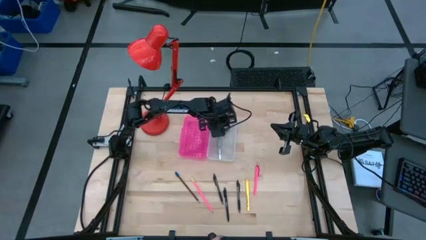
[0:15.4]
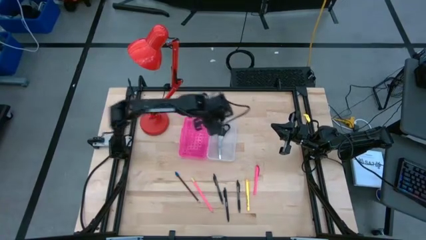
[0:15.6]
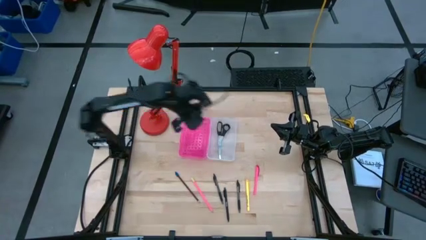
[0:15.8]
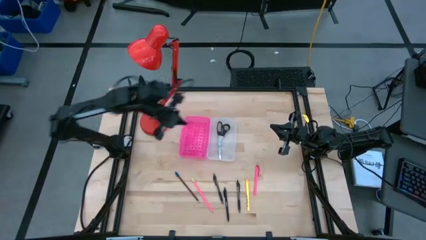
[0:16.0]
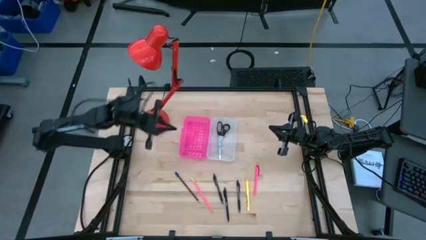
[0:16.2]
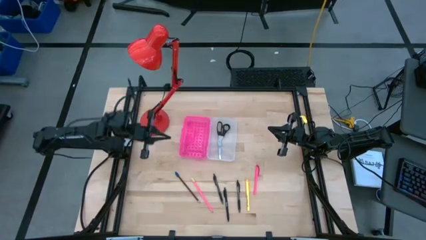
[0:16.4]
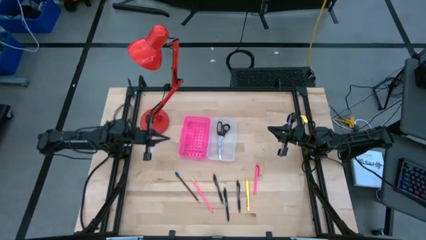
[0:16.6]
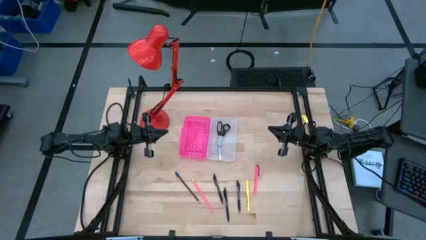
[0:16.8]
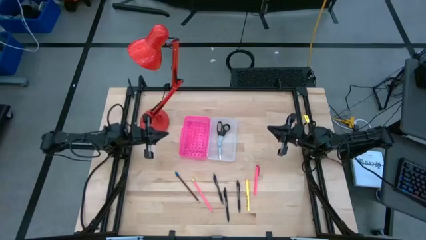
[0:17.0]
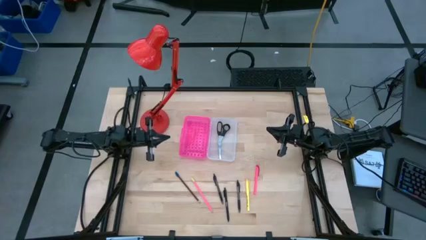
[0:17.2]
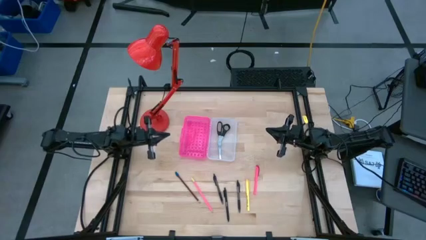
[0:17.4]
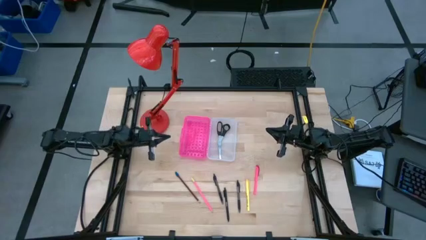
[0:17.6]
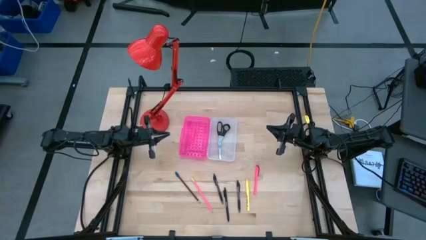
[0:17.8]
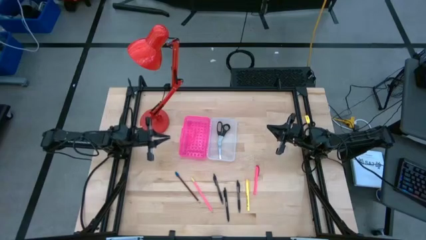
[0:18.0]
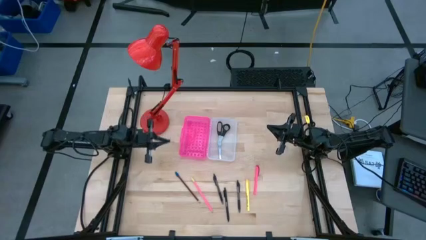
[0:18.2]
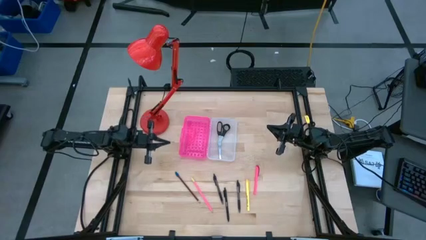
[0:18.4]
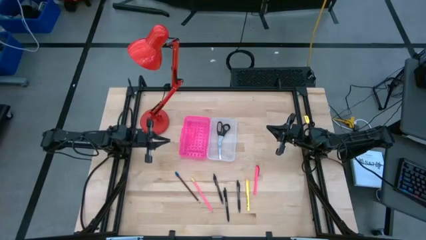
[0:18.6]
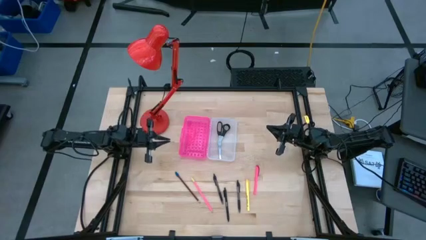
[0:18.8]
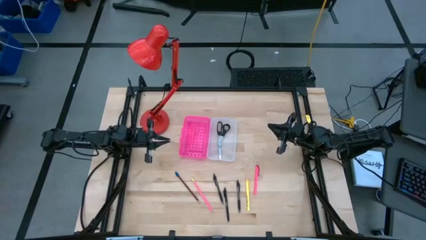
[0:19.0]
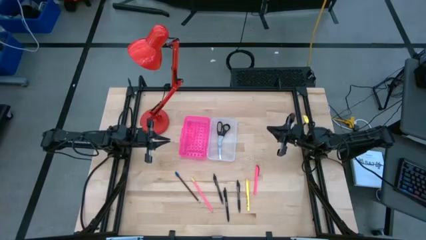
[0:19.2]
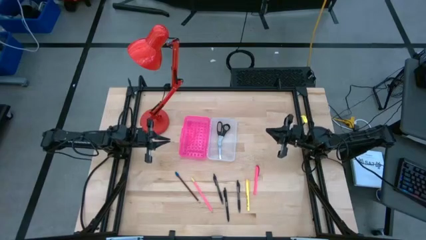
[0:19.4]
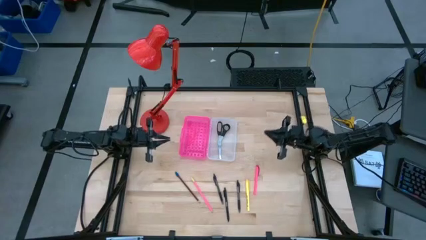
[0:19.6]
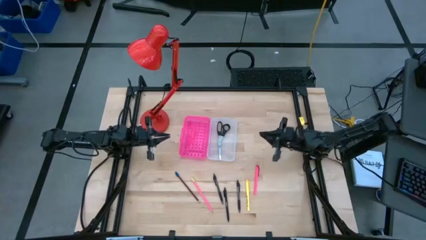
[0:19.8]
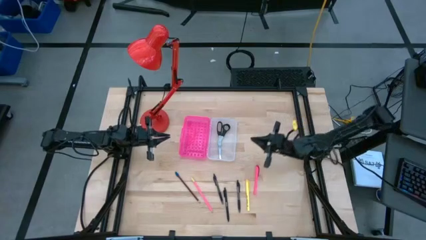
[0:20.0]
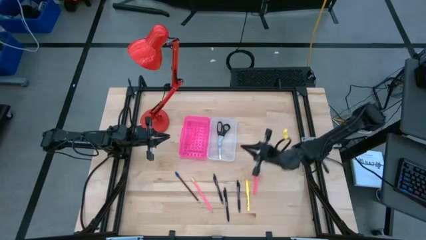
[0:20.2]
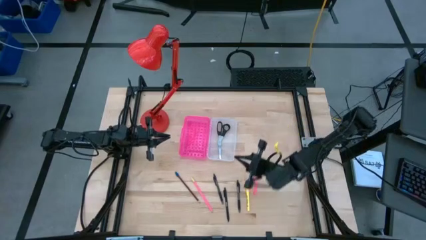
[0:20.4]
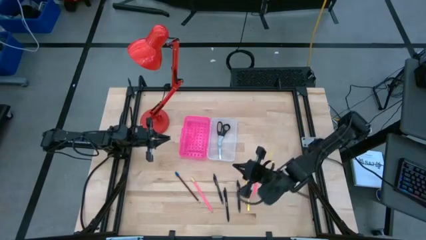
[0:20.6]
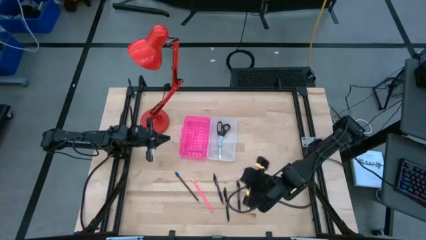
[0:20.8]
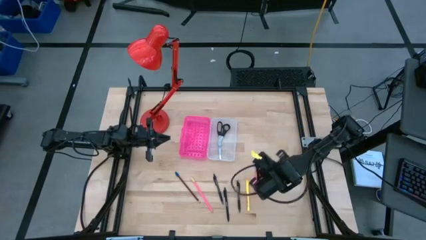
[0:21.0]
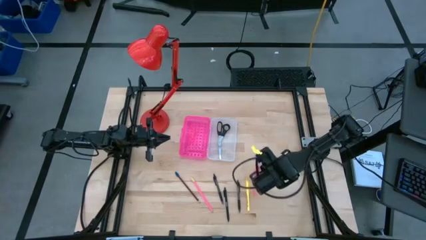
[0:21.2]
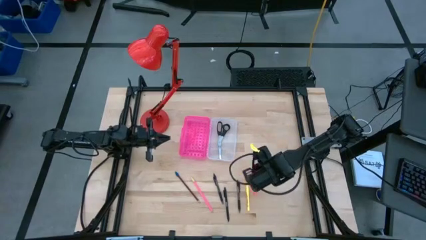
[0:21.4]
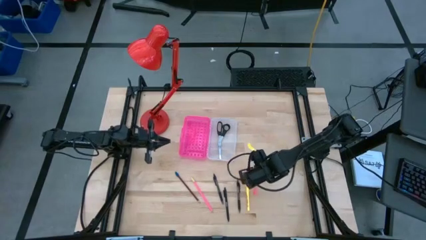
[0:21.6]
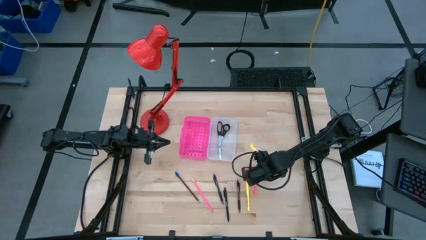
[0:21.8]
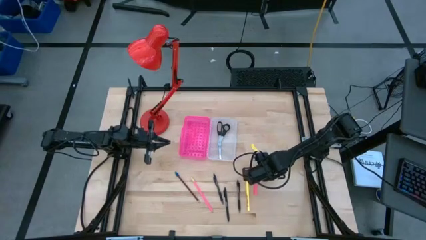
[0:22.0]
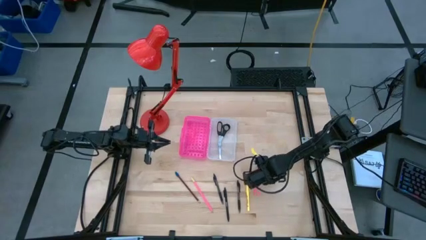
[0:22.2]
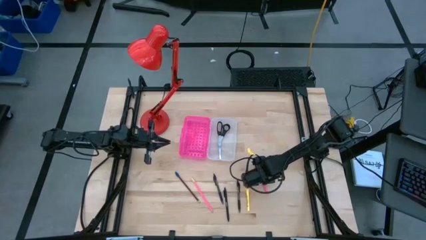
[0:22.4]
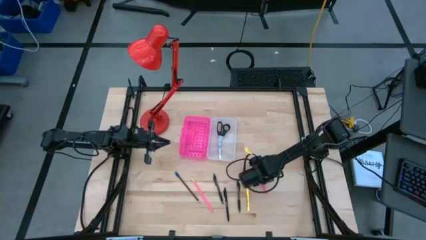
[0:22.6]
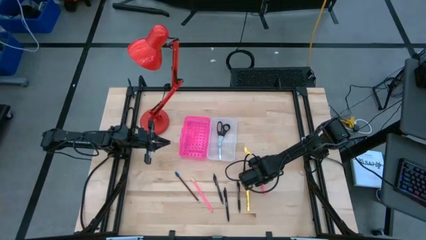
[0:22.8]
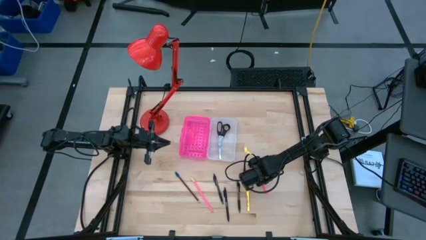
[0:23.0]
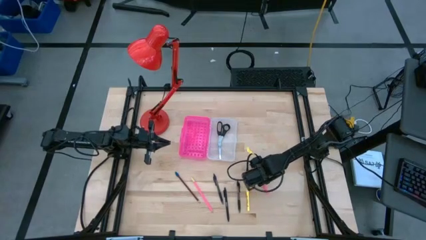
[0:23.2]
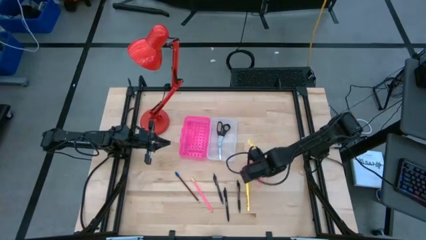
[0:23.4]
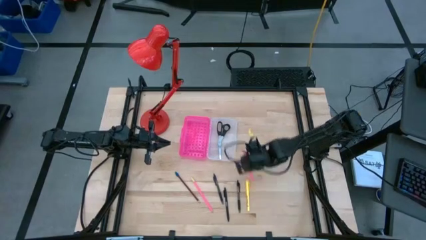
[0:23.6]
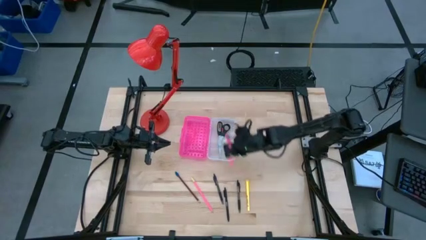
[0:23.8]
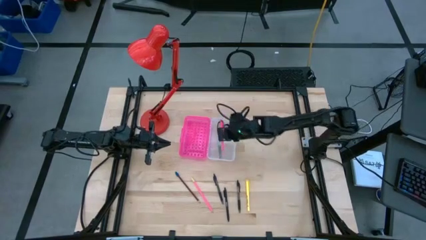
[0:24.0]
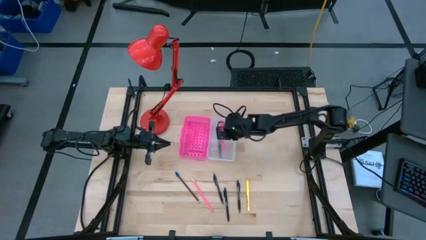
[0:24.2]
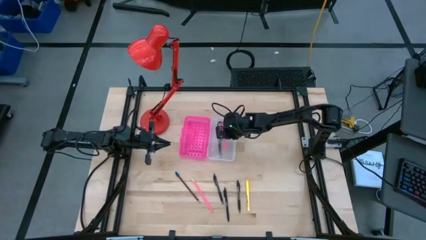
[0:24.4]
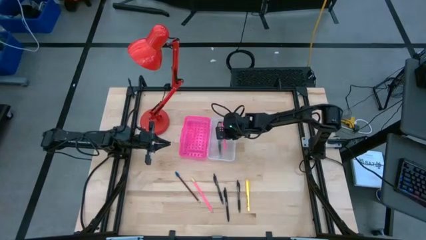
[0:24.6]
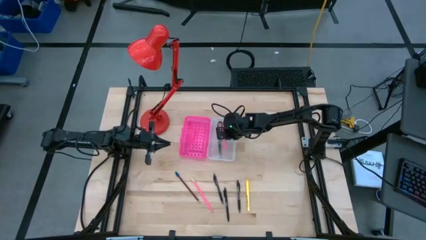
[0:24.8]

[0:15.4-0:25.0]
Task: Pick & place school supplies into a supply box
Put the pink pen into the supply box

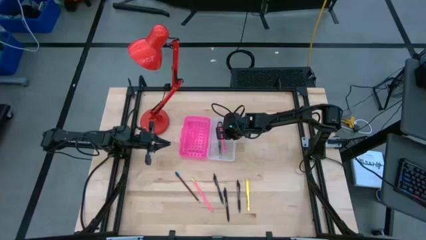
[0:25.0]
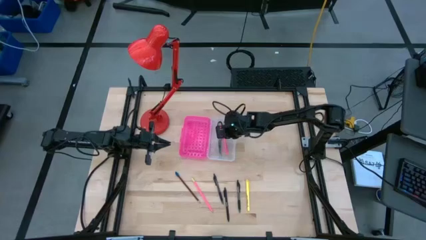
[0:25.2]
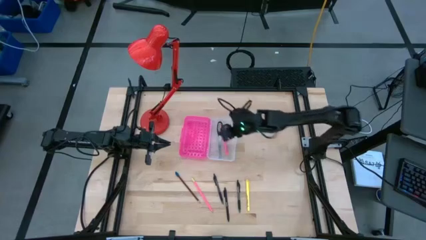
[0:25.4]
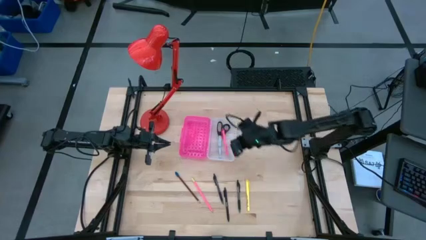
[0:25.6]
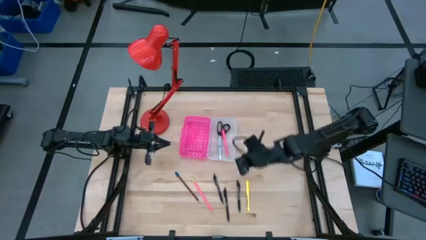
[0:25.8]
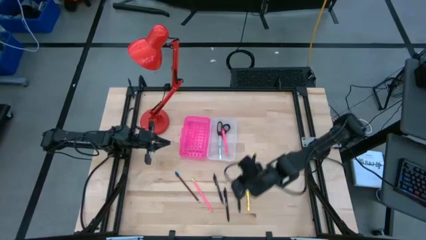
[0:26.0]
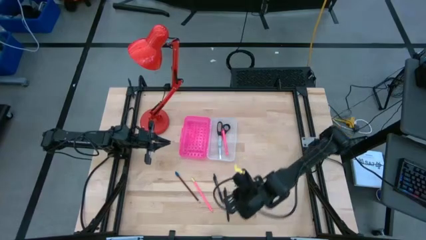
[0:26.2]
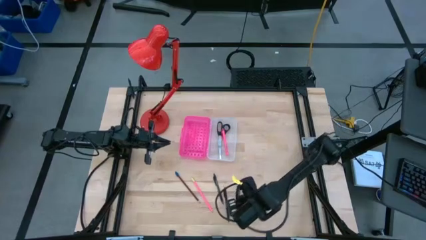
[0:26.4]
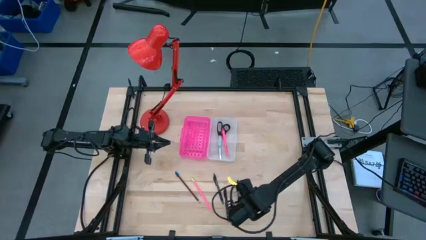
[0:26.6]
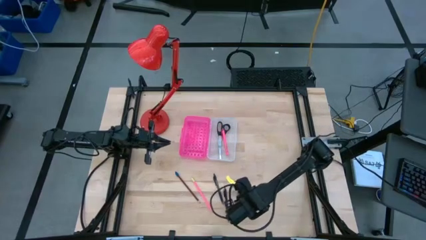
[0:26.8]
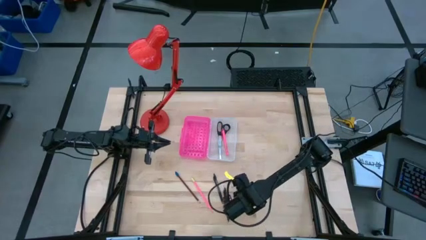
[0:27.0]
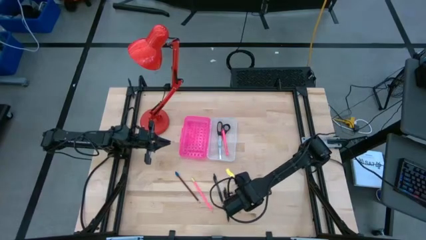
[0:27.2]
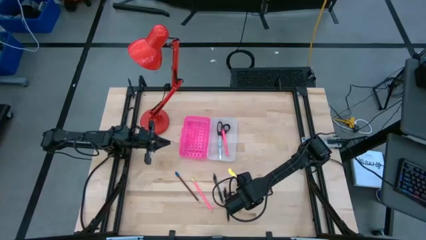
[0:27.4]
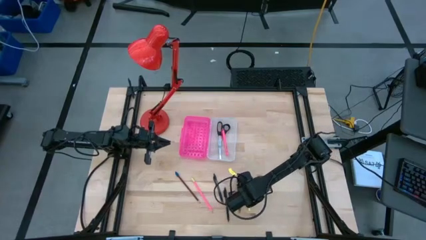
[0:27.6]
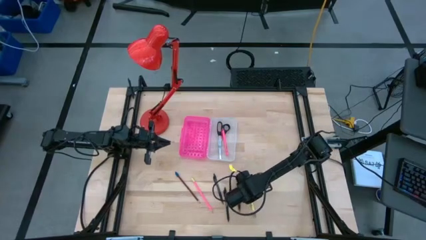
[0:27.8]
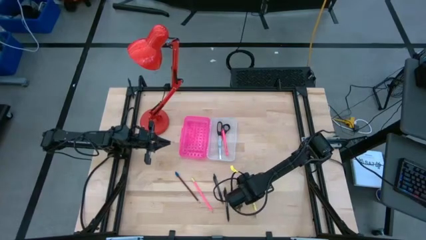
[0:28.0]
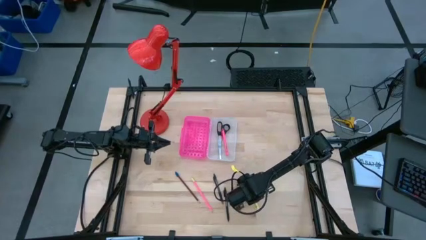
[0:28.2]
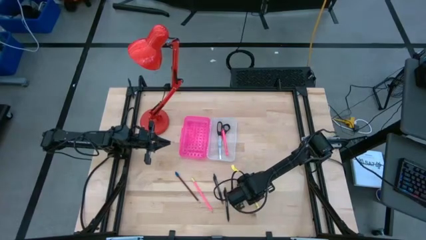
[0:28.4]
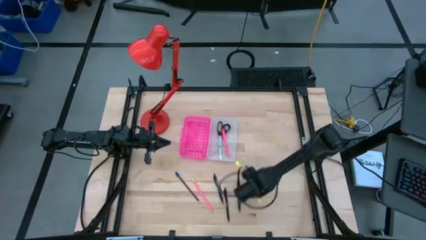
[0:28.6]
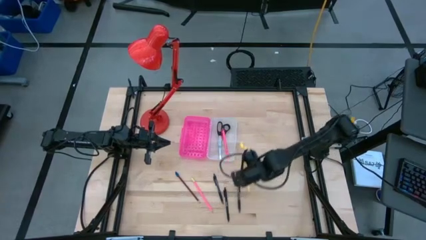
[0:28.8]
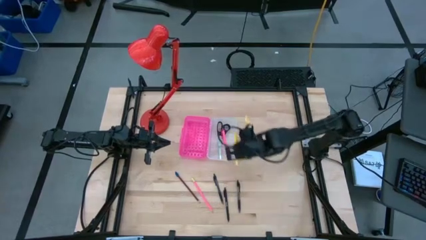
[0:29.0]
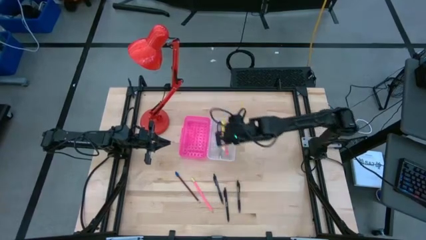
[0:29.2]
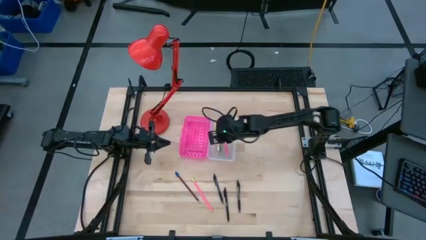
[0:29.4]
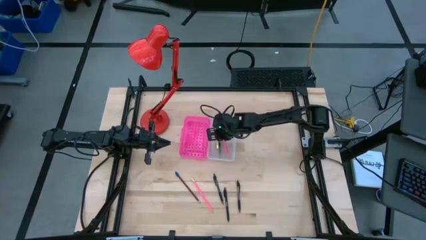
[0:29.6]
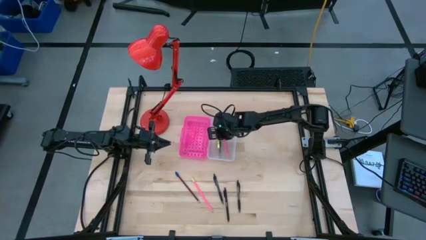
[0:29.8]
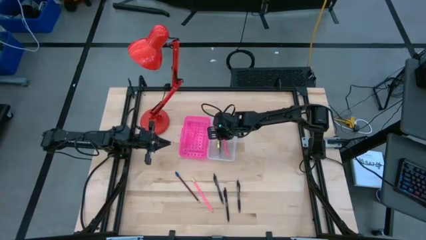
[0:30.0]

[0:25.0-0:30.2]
Put the yellow pen into the supply box

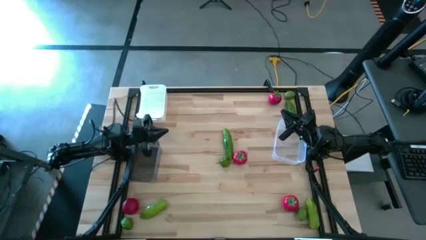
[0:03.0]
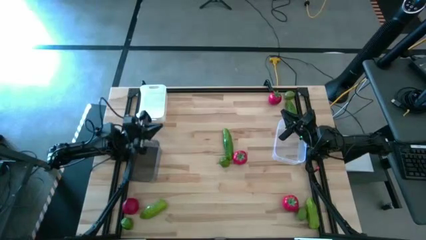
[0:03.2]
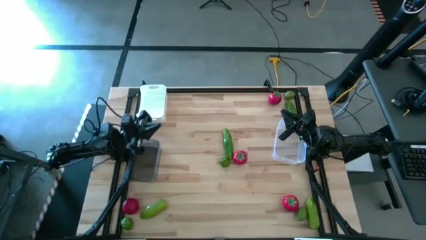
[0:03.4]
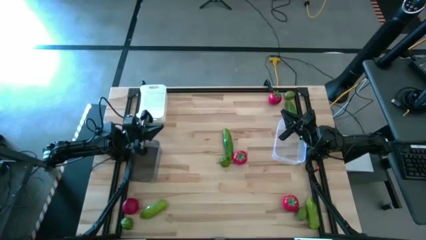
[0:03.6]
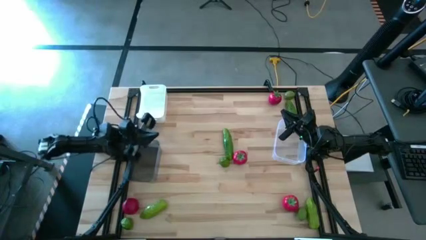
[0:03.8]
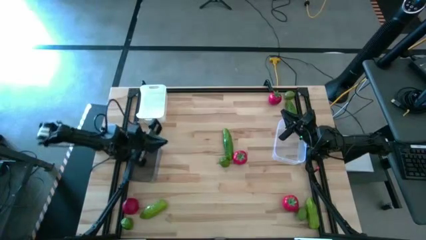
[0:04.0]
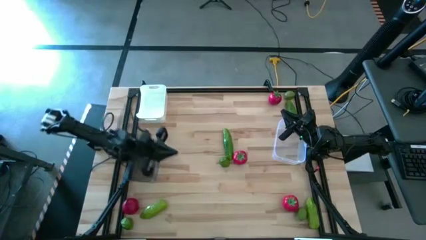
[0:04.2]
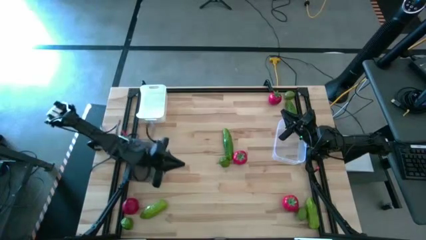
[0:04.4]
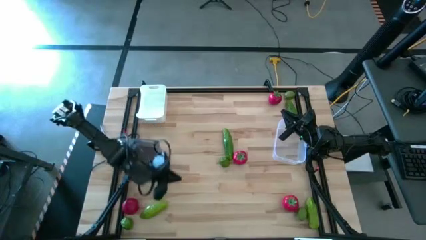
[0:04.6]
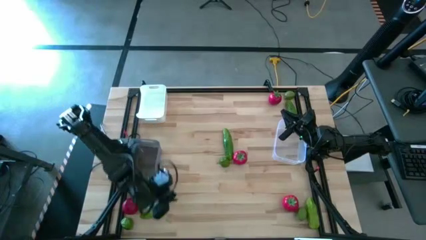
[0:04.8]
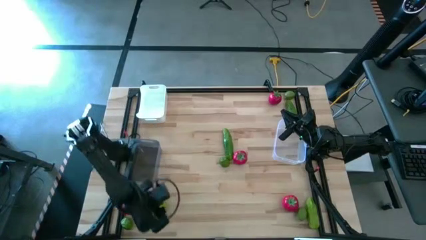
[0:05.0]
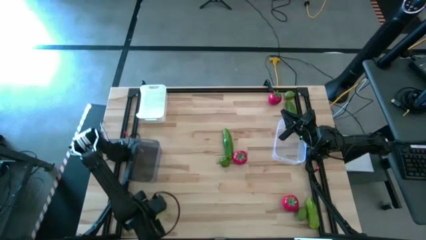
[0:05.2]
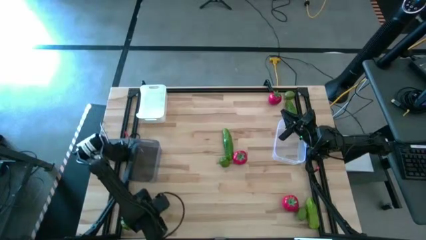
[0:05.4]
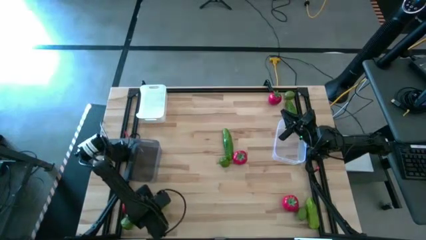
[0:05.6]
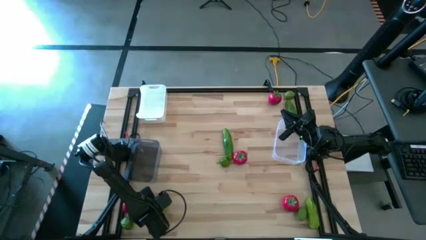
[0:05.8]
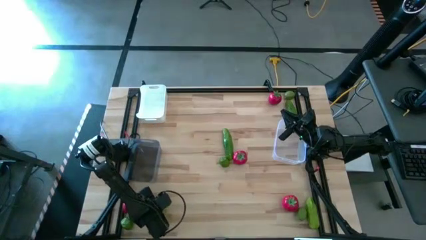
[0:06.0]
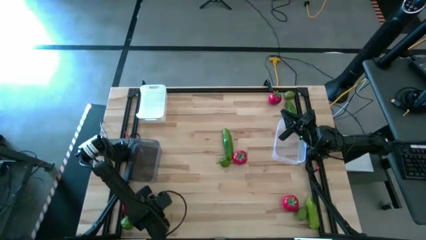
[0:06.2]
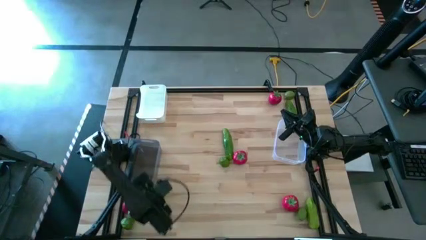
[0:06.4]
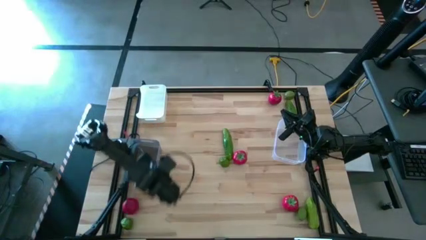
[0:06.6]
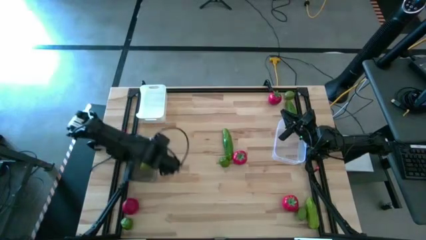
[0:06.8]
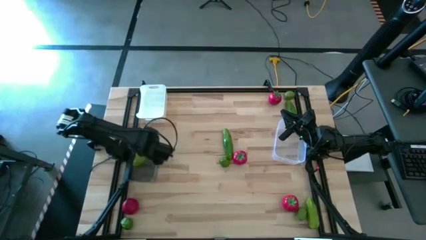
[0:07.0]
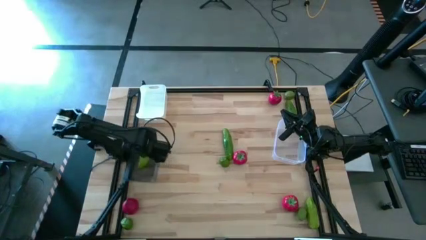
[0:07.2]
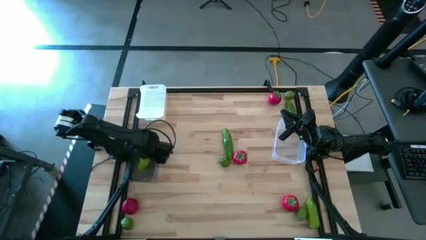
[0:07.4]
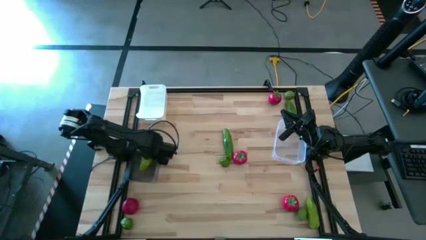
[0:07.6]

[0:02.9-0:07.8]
Task: Sort produce into baskets
Put the cucumber into the black bin
